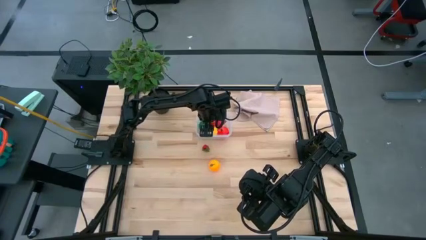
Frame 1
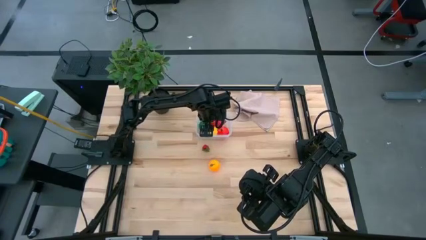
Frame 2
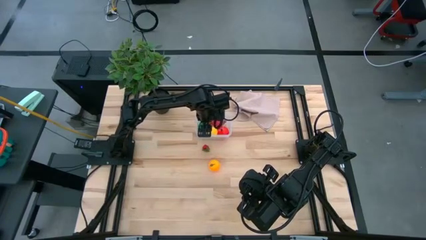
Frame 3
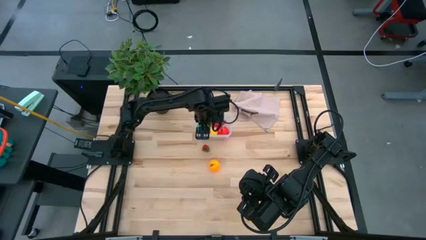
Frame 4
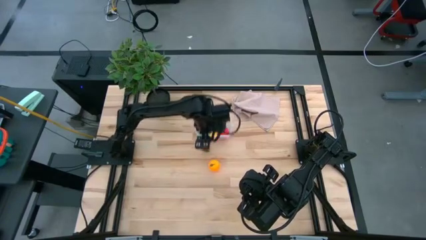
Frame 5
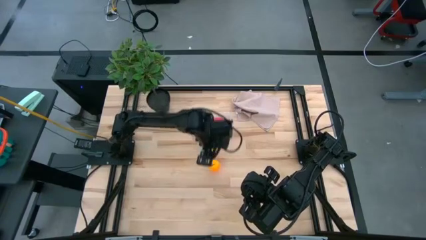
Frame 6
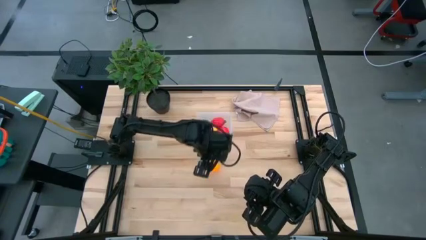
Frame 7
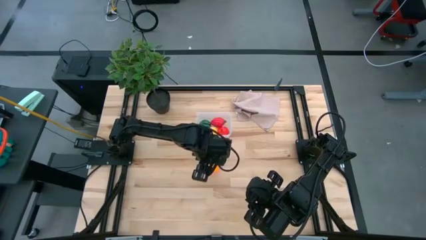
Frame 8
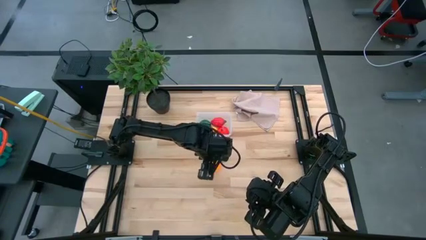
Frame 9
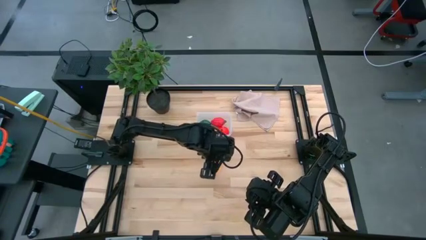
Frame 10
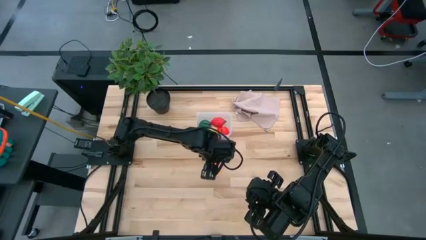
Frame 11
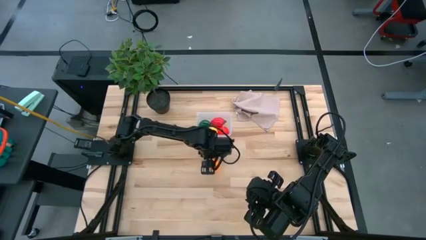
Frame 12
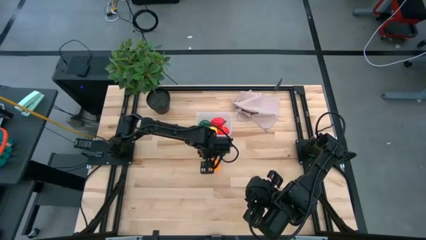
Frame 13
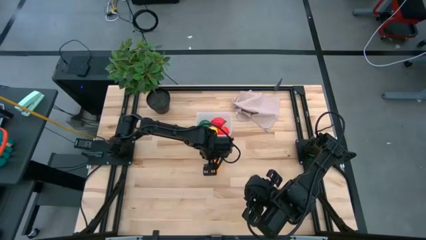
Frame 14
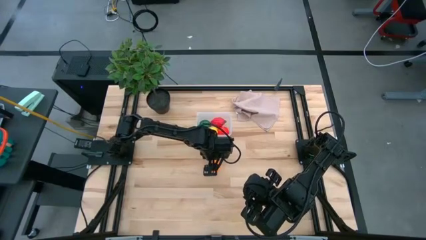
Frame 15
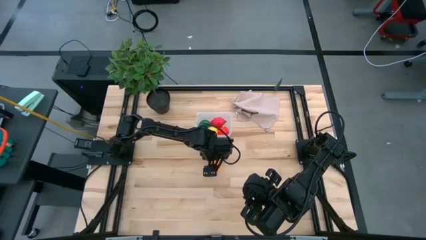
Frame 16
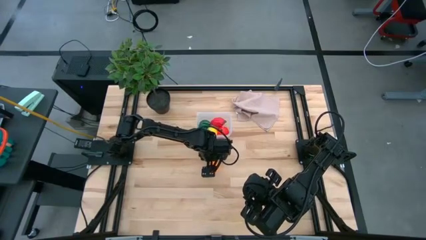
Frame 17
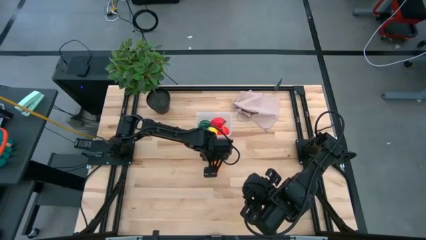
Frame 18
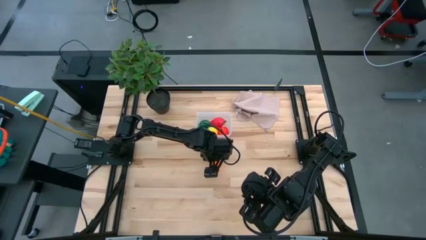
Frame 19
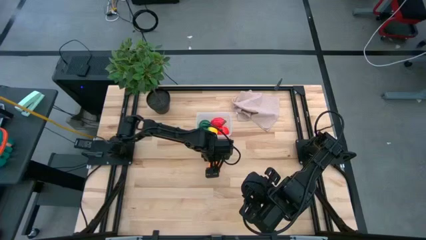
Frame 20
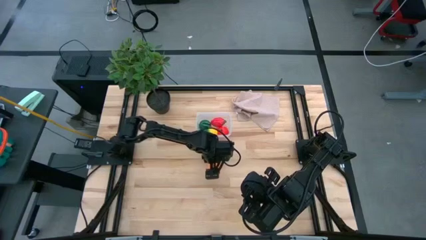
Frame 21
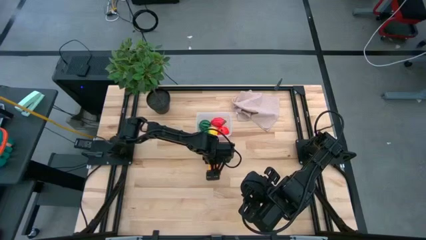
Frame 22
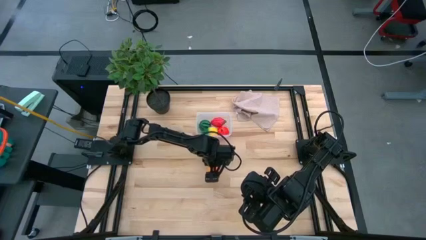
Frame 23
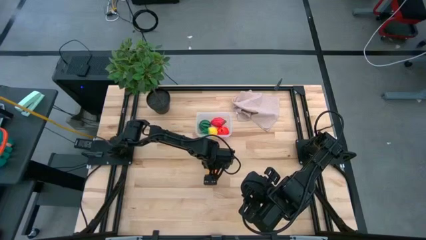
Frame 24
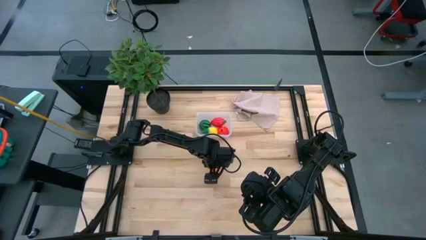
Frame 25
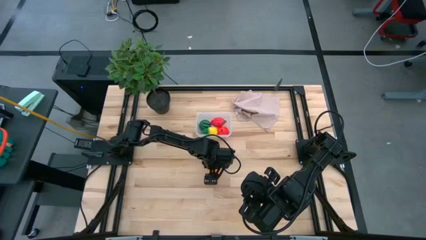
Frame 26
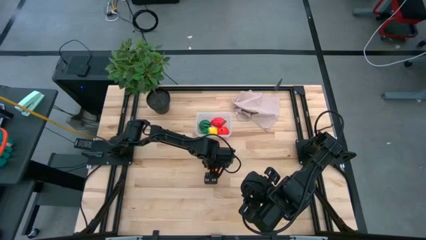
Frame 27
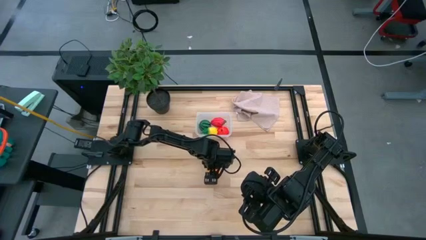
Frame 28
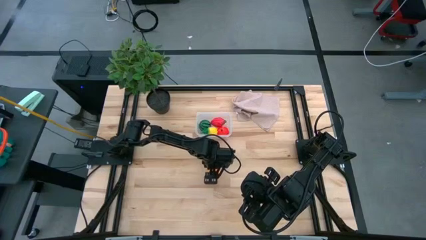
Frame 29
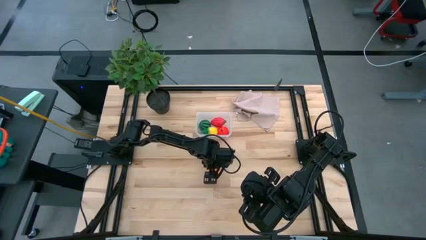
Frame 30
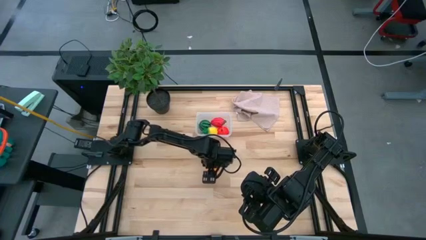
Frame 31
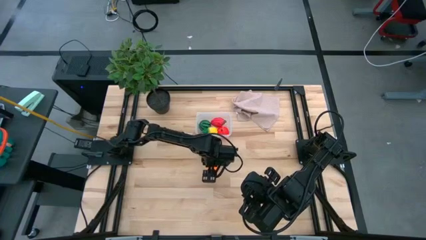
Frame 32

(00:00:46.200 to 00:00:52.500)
Task: Pick and placing Produce into tupperware
Put the orange into the transparent container

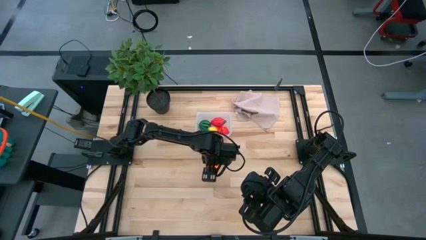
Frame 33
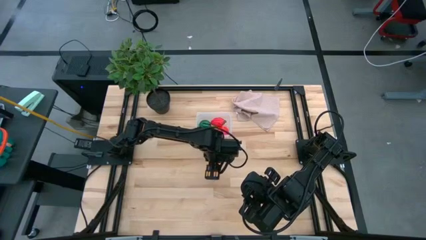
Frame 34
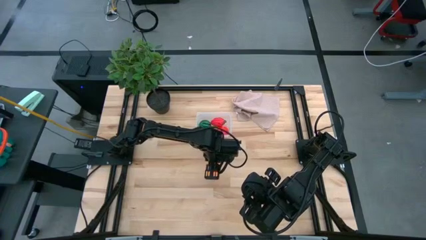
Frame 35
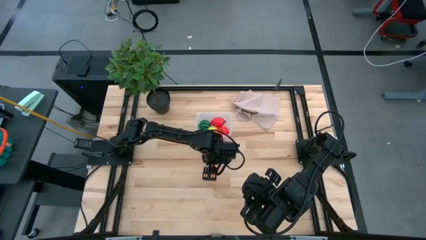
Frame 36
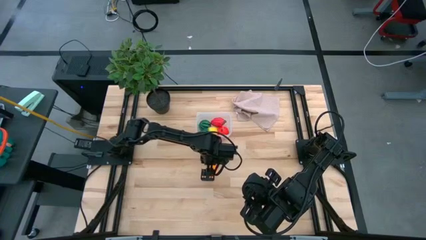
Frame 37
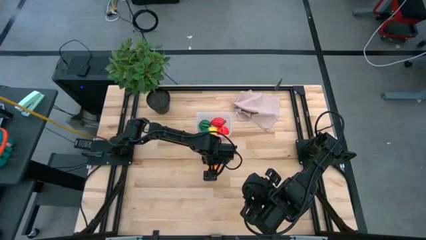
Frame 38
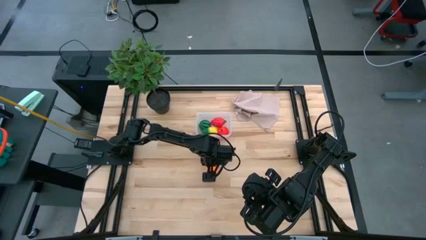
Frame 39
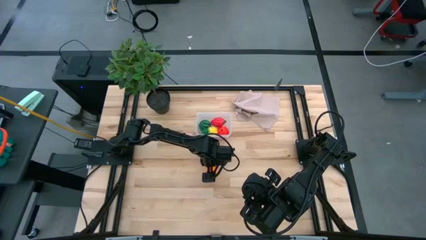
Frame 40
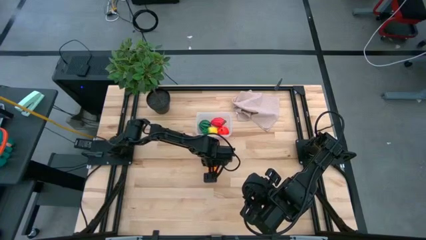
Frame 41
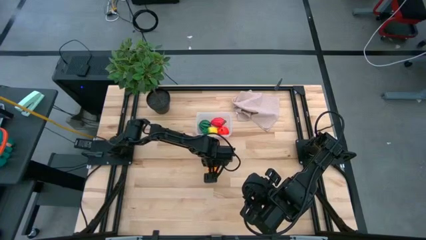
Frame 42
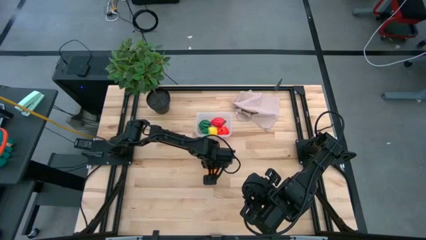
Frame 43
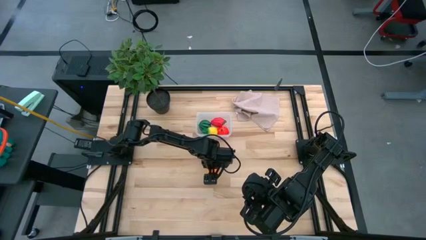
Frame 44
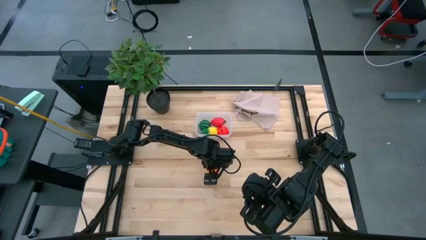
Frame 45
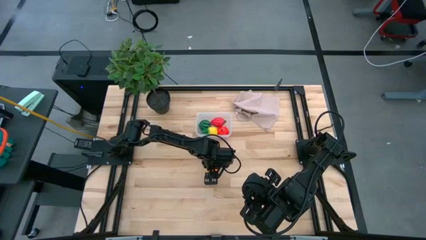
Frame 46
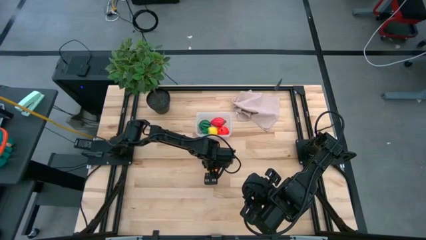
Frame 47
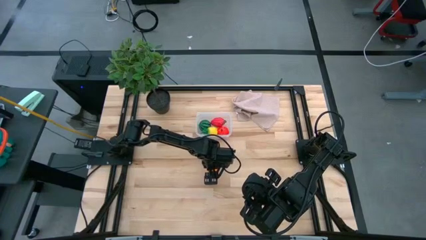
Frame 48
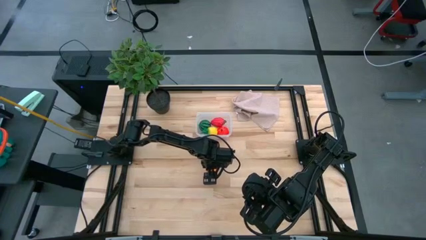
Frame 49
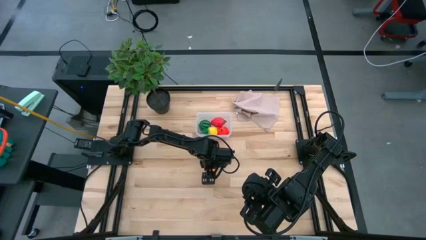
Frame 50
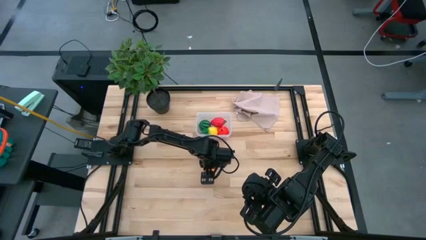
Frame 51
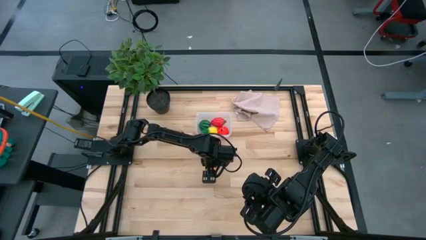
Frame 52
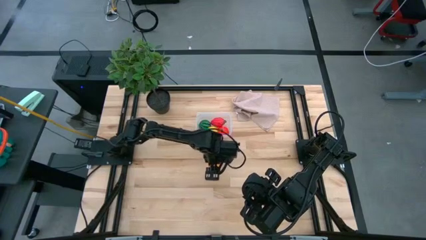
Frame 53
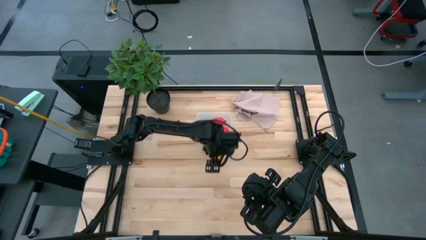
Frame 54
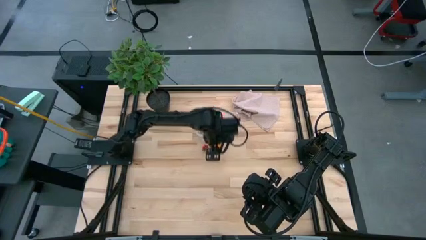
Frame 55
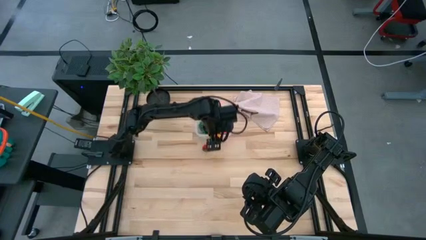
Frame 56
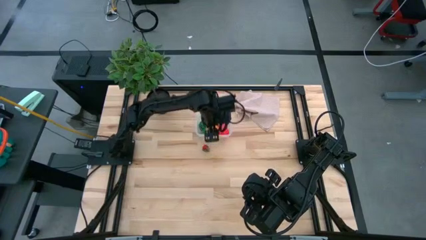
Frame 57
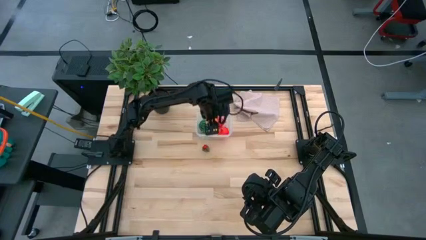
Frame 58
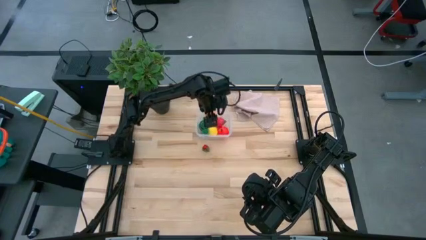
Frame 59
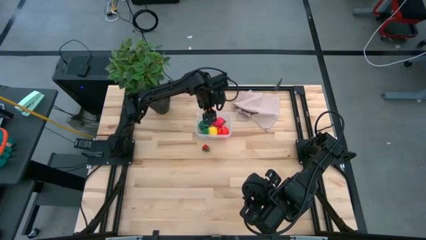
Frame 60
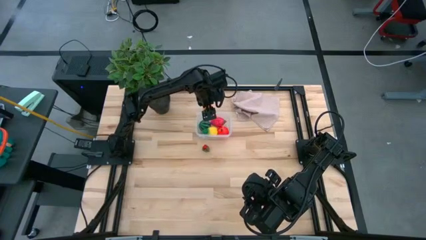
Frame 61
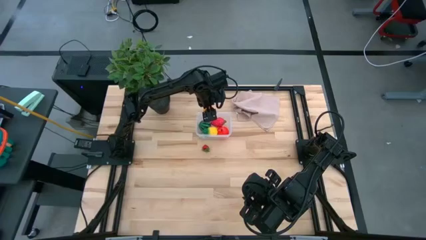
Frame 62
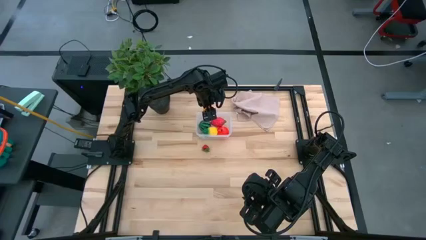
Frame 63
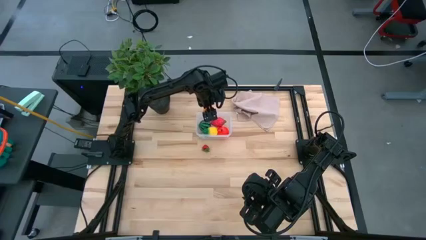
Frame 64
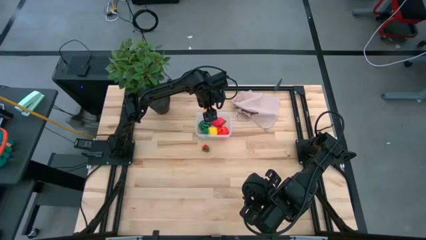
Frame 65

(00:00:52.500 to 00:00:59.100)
Put the orange into the transparent container
